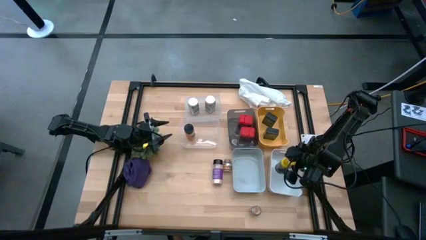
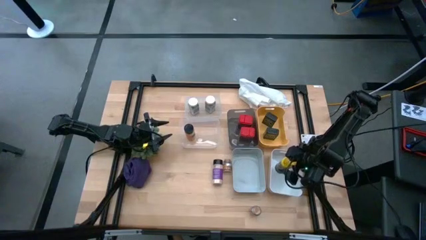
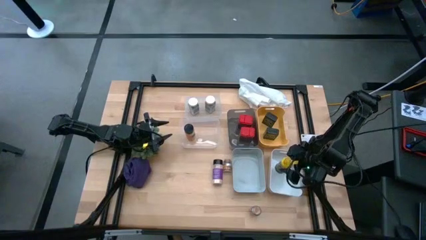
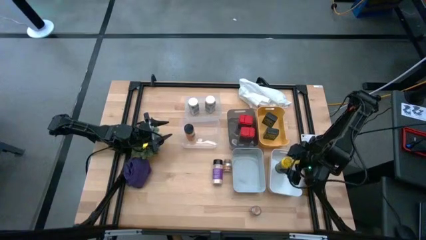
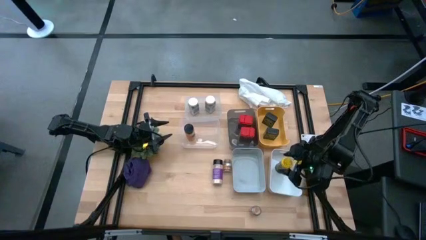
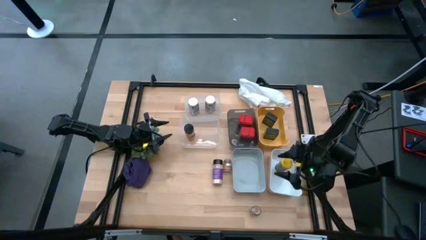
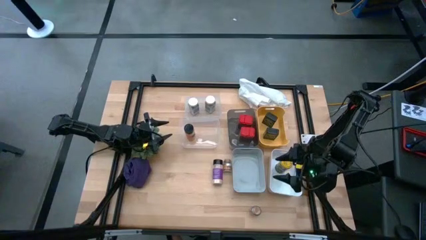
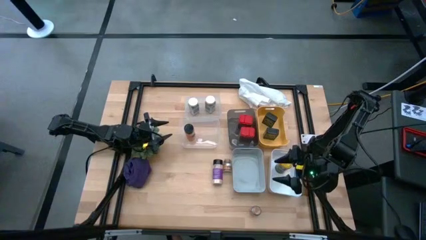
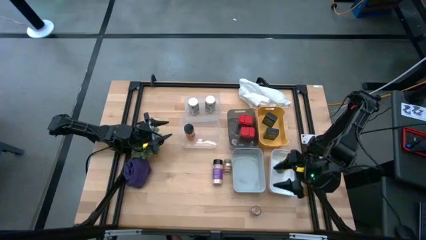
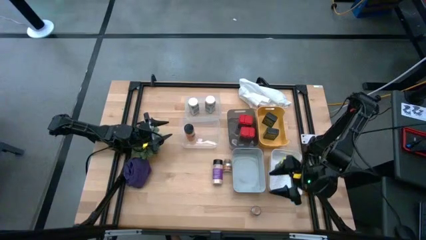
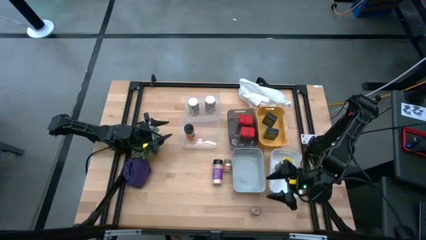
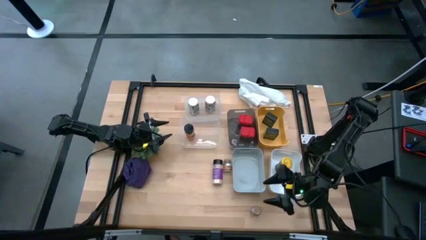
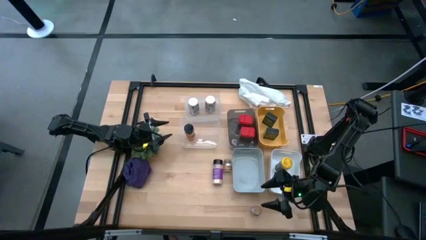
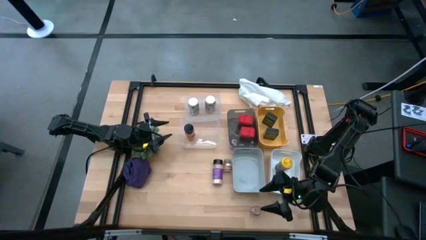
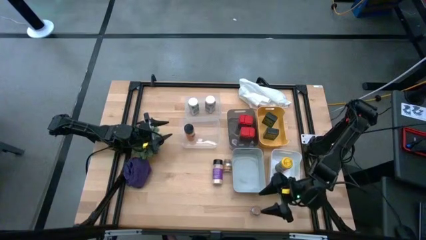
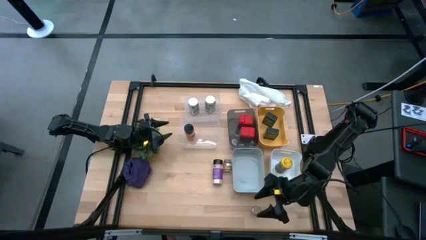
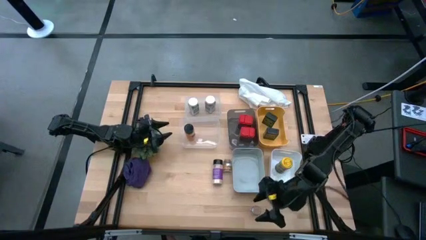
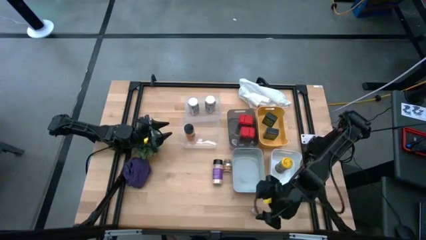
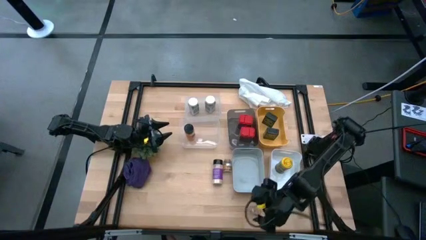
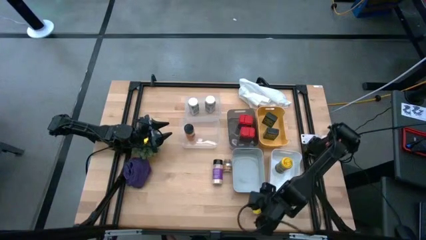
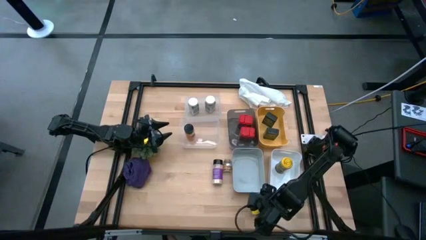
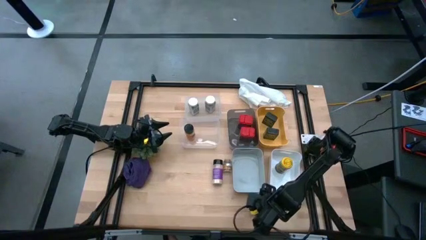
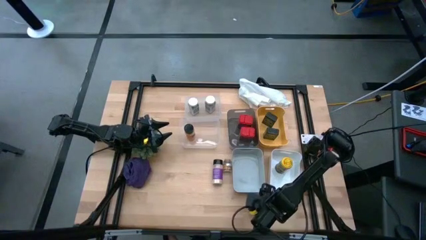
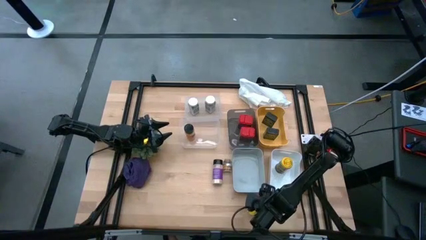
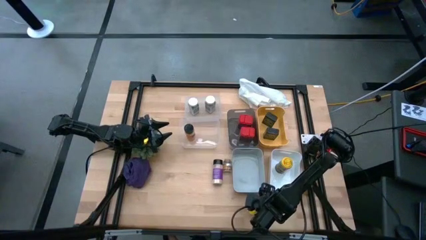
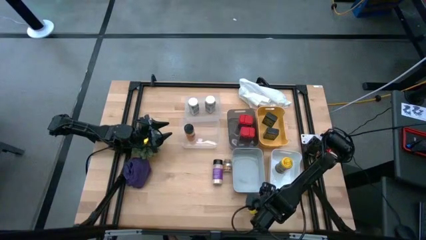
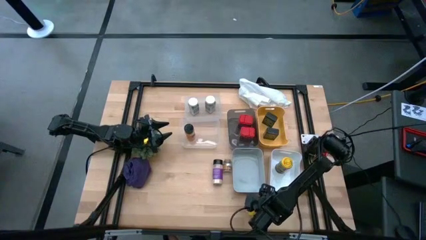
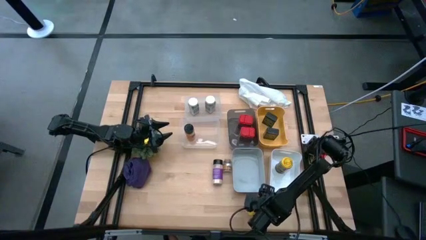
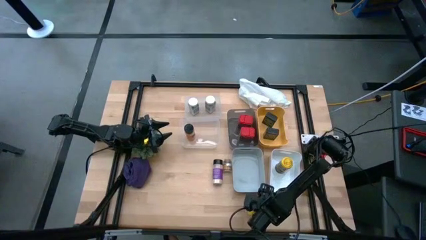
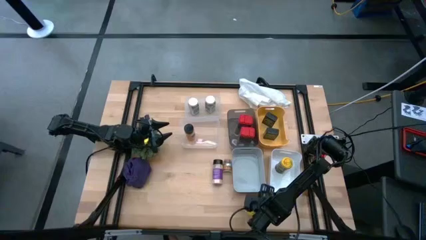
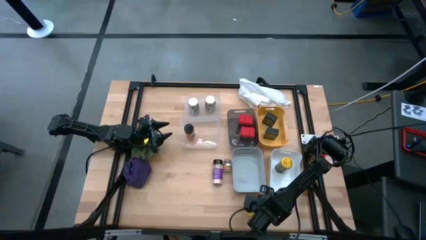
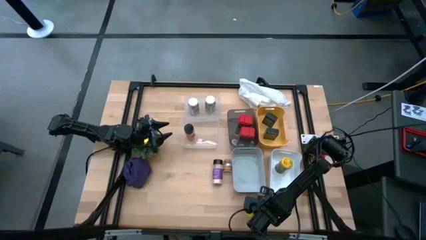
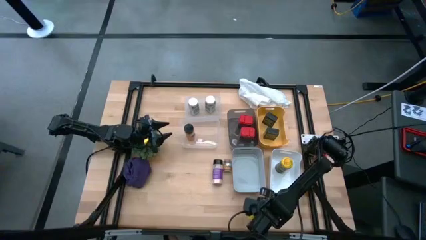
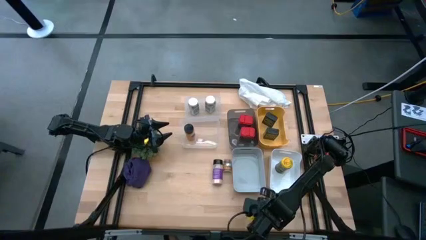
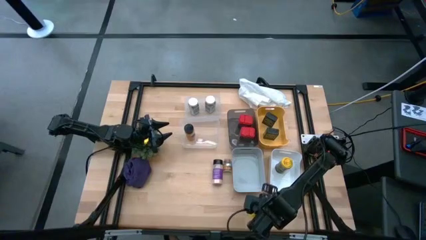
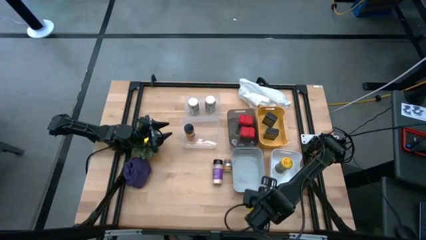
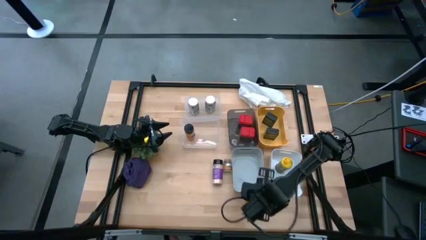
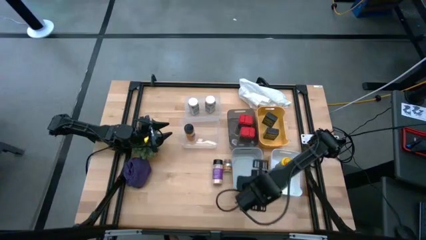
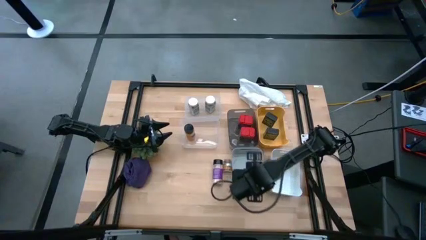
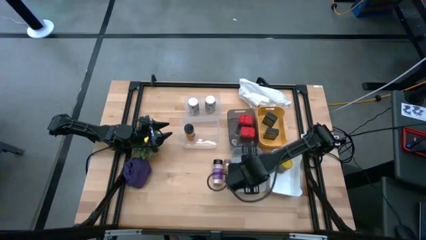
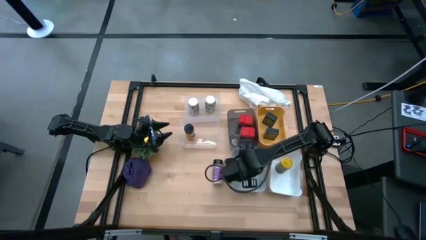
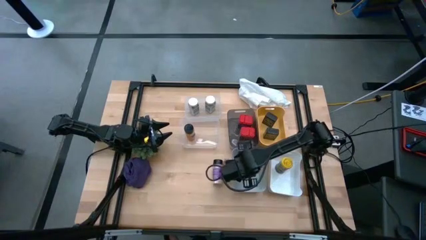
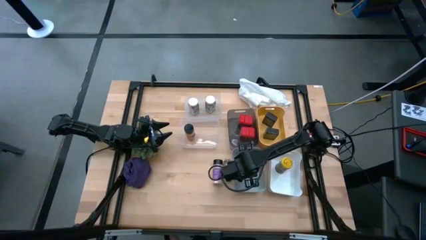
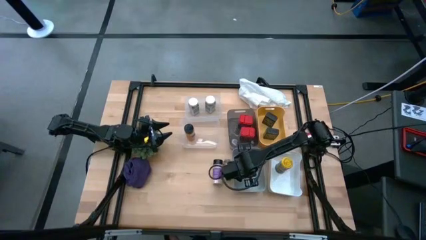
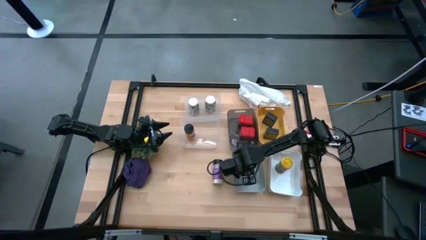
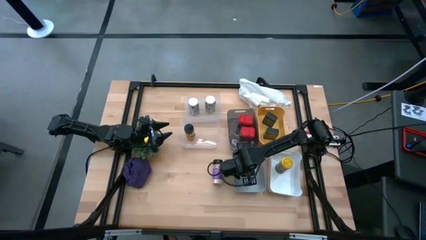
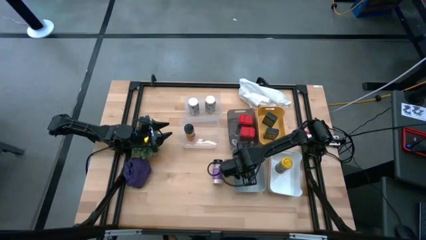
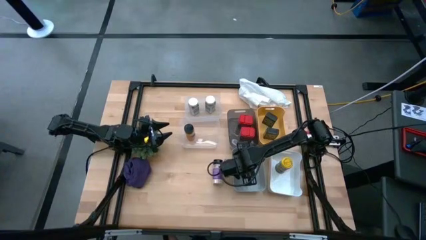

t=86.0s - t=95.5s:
Task: Sort spices by type
Put the bottom brown seasoning bottle into the gray bin

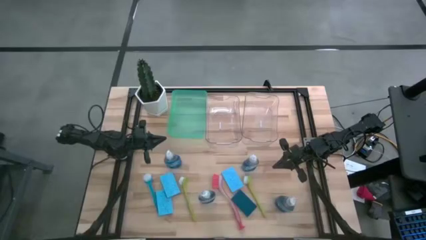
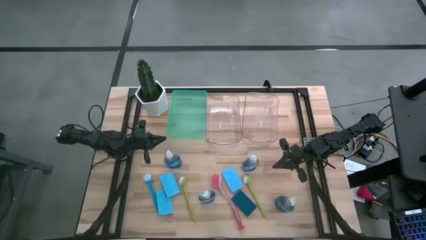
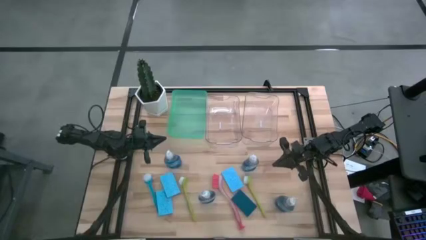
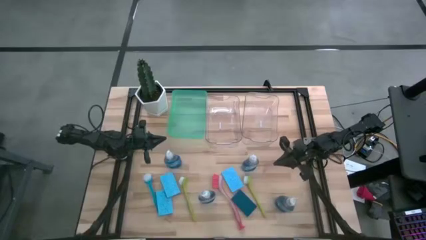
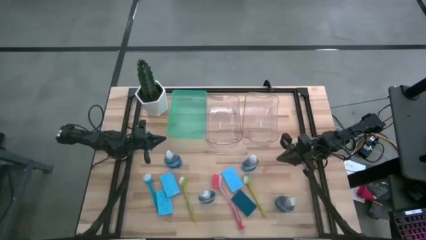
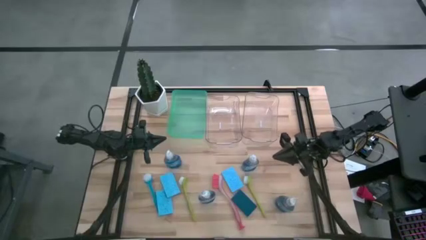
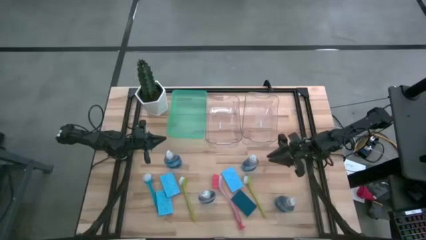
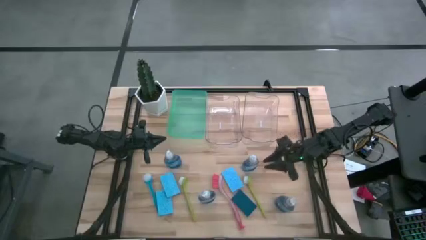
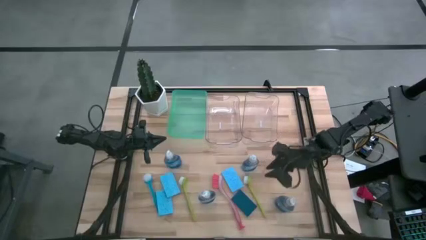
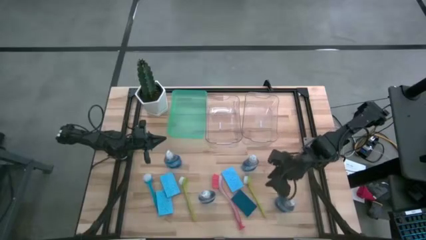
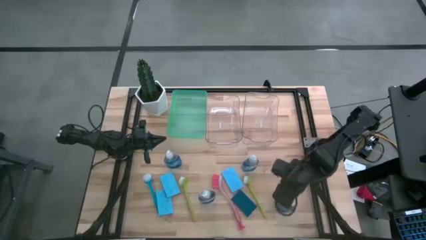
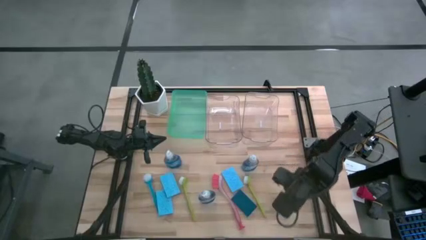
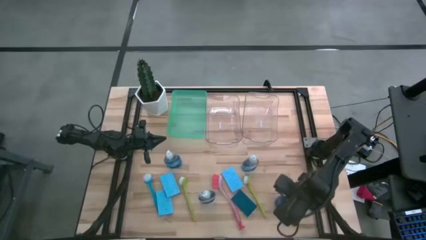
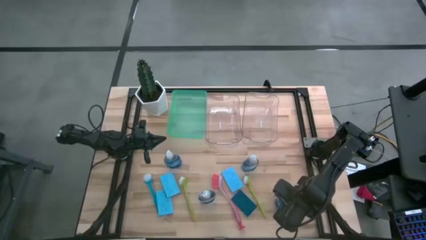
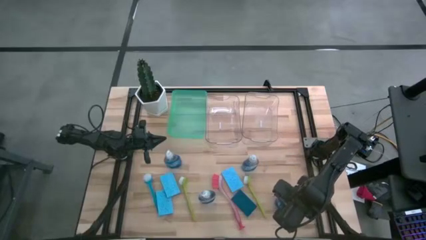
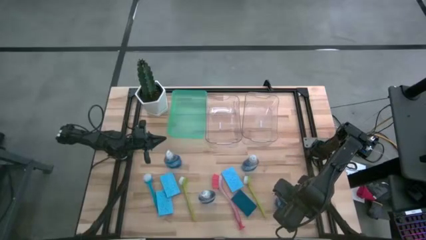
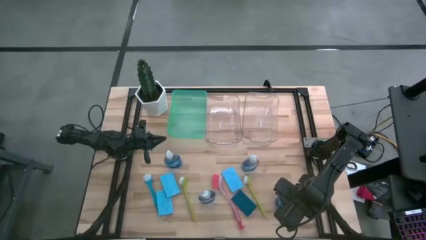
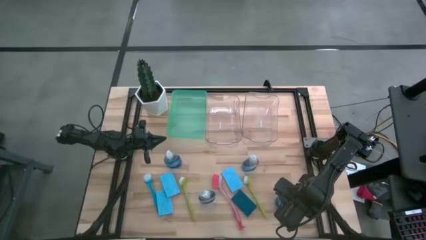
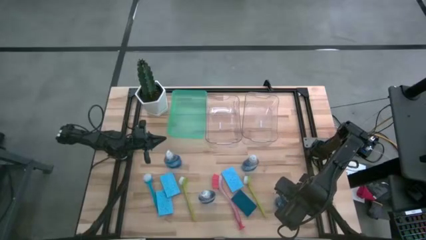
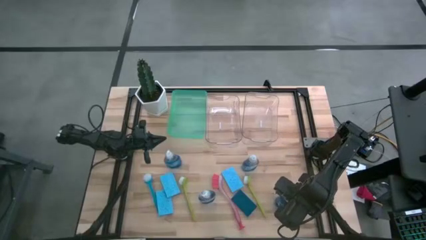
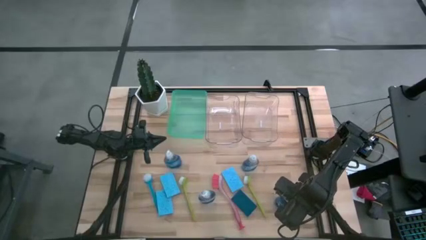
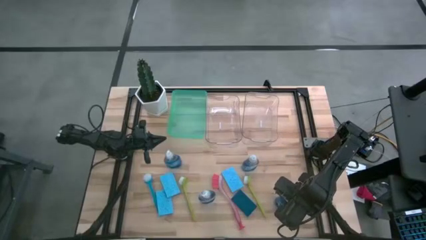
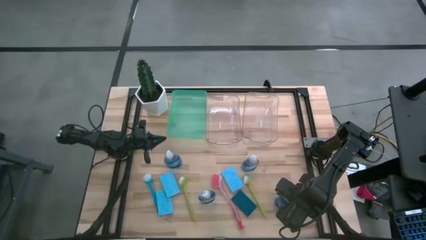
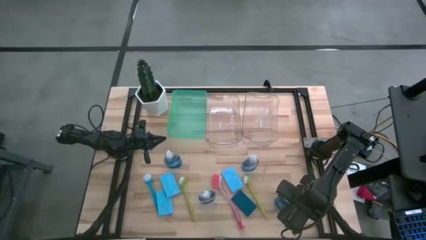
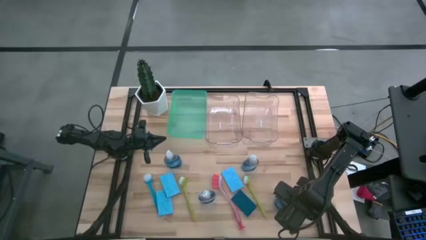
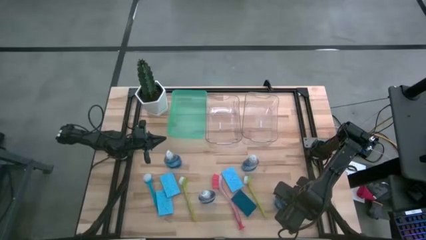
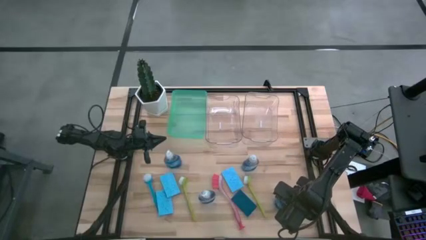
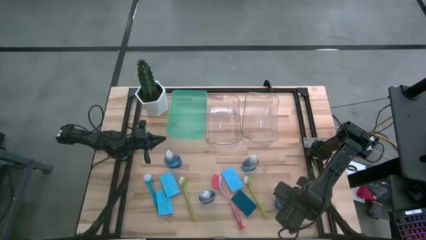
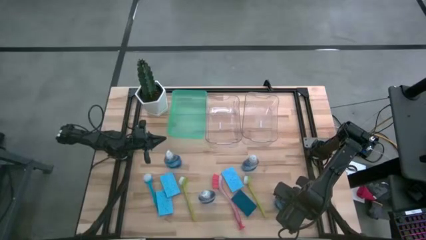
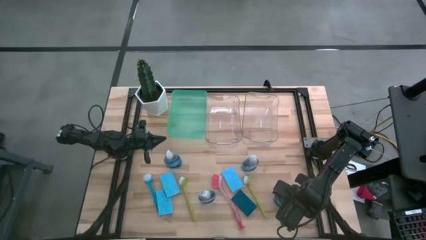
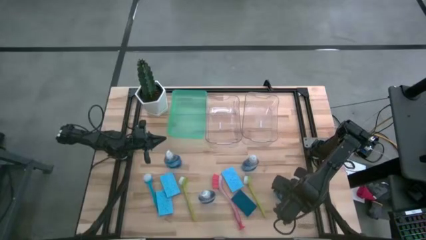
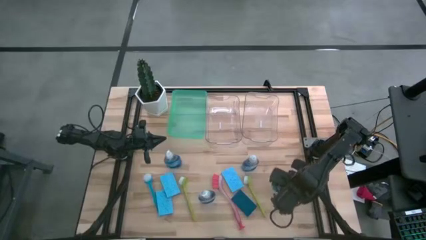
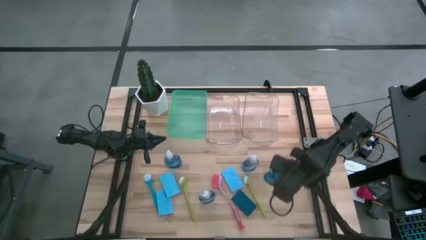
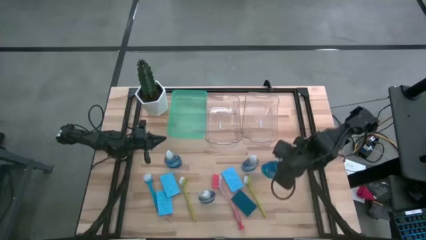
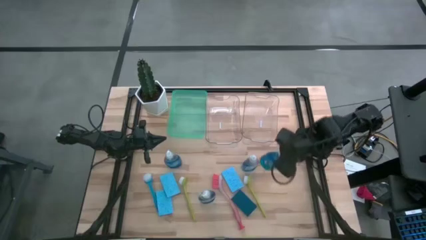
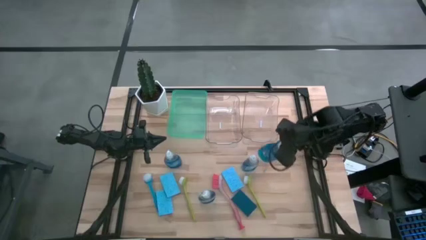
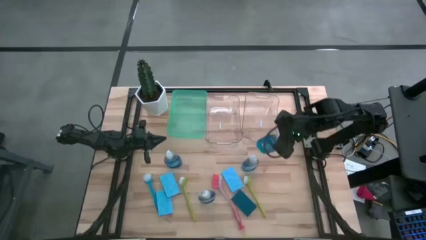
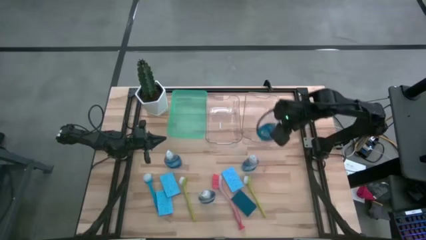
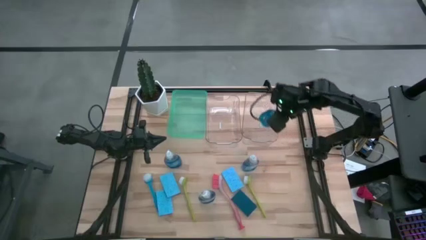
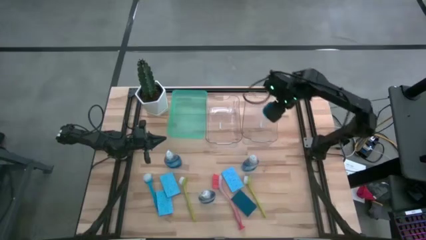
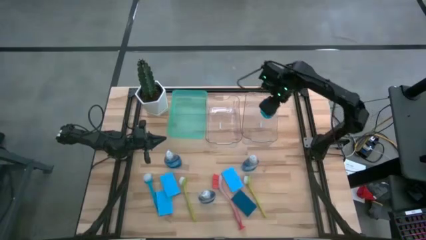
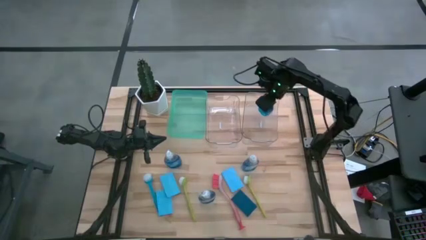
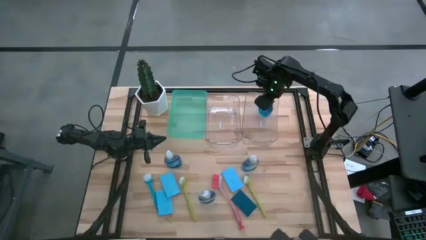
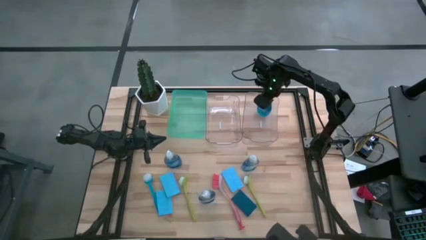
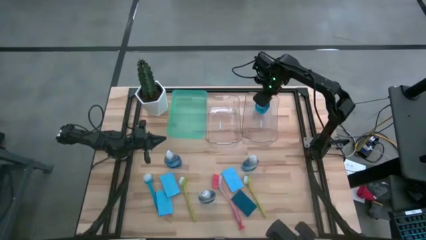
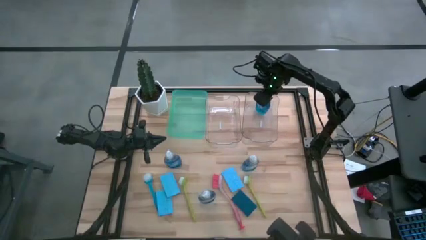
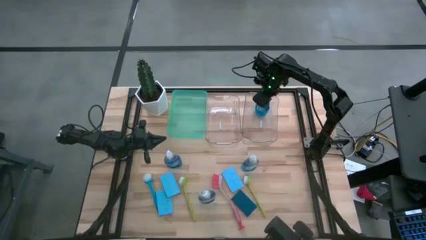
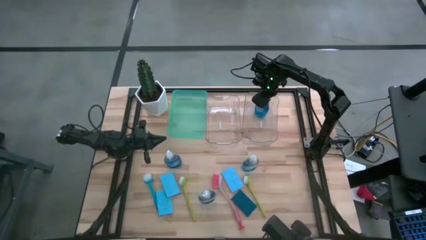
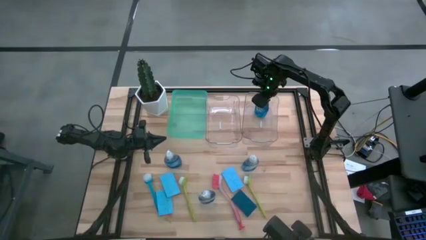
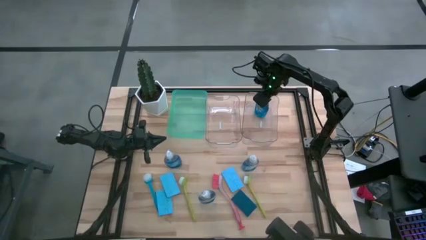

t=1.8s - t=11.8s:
Task: Pick & Place Kitchen Sink Supplies
Put the blue dishwashing liquid bottle into the right transparent bin
